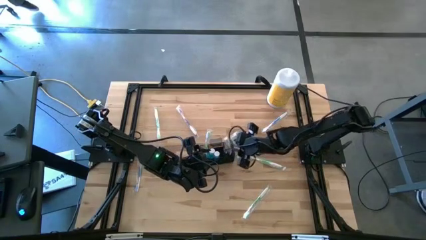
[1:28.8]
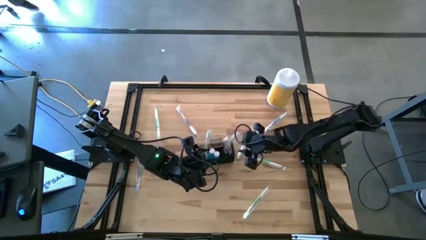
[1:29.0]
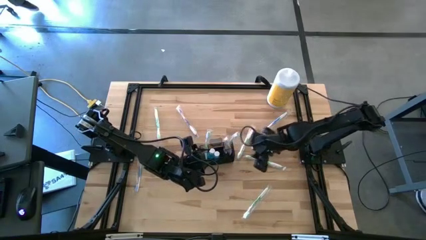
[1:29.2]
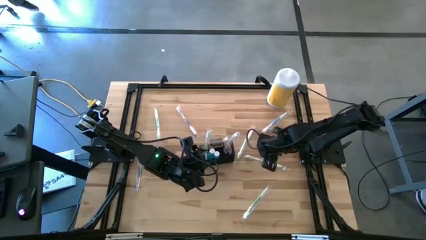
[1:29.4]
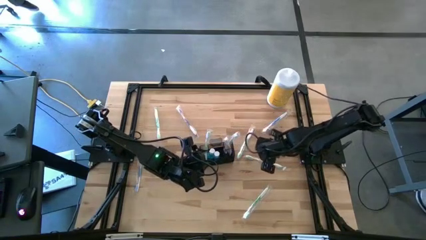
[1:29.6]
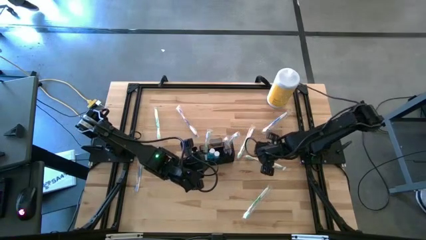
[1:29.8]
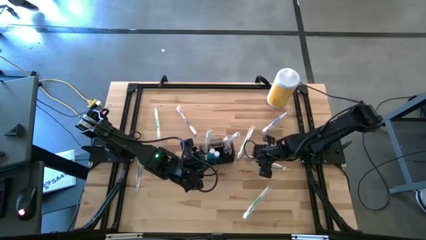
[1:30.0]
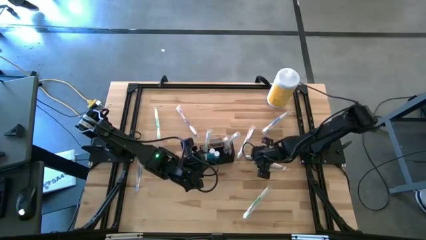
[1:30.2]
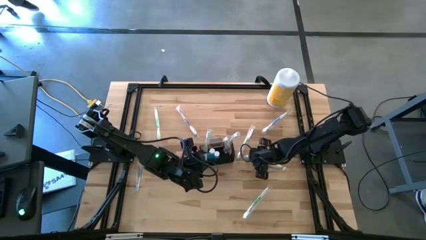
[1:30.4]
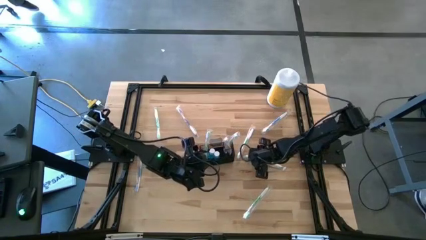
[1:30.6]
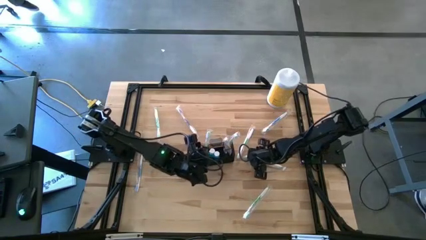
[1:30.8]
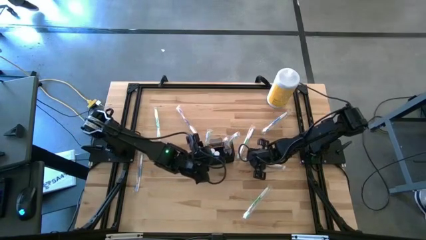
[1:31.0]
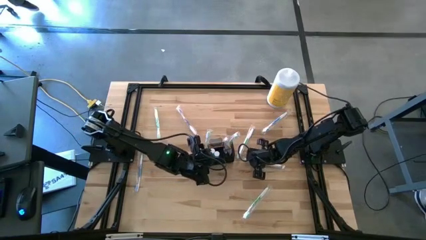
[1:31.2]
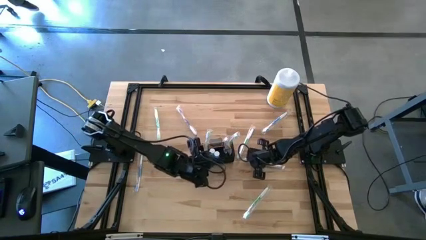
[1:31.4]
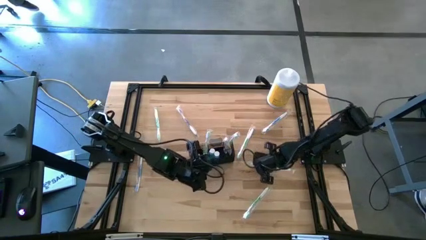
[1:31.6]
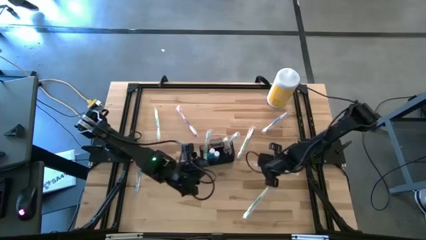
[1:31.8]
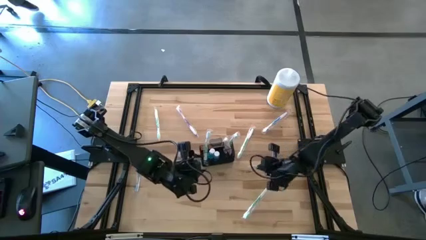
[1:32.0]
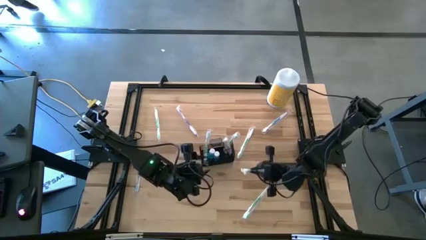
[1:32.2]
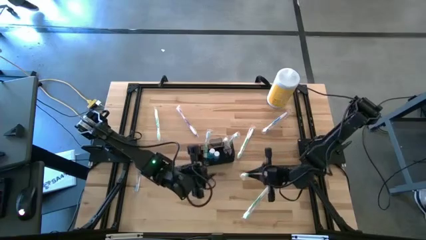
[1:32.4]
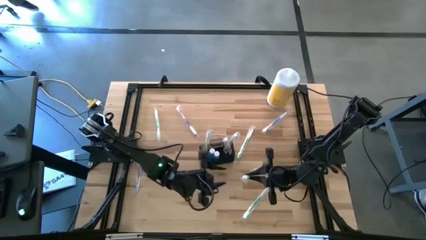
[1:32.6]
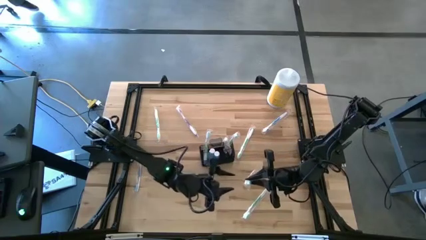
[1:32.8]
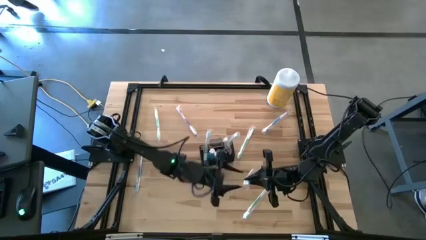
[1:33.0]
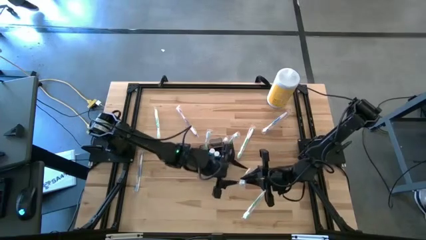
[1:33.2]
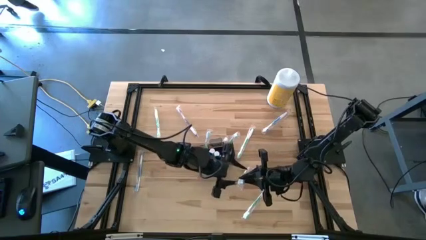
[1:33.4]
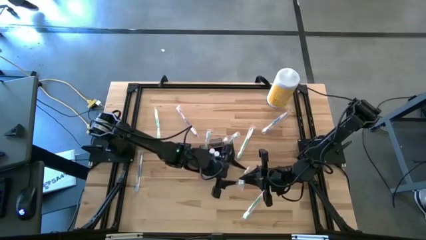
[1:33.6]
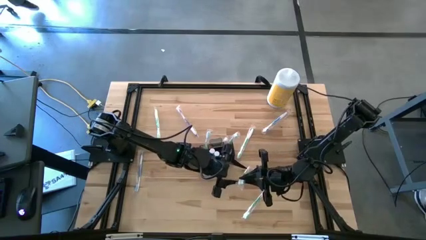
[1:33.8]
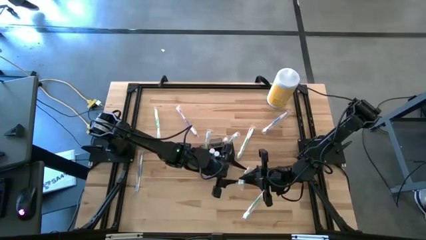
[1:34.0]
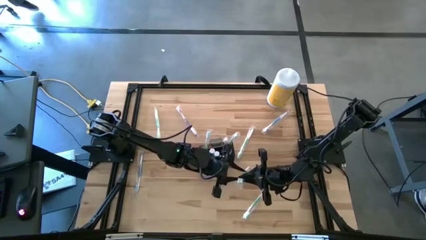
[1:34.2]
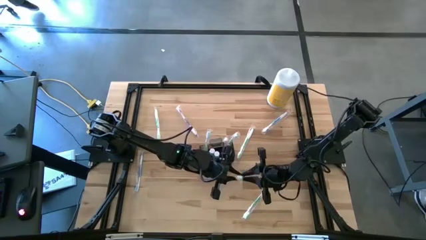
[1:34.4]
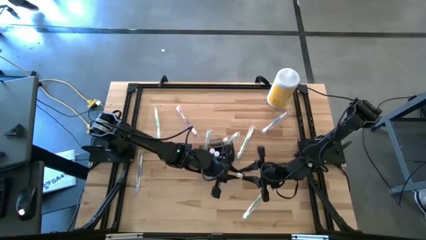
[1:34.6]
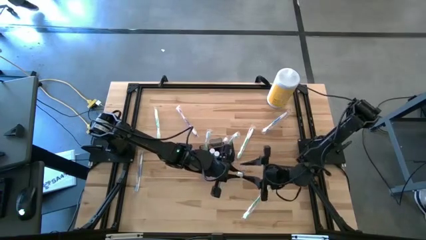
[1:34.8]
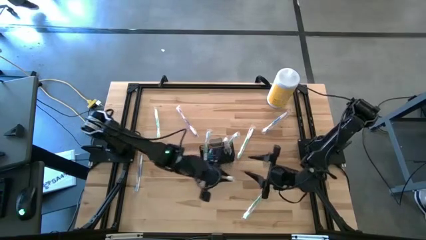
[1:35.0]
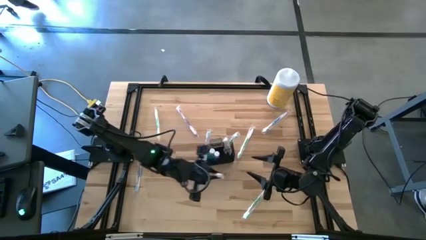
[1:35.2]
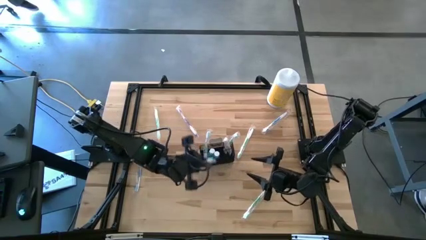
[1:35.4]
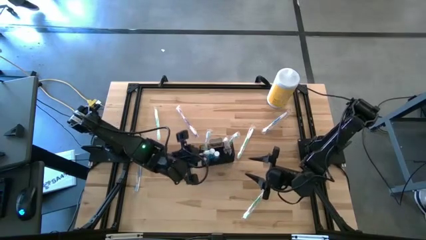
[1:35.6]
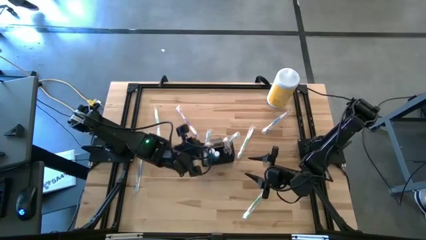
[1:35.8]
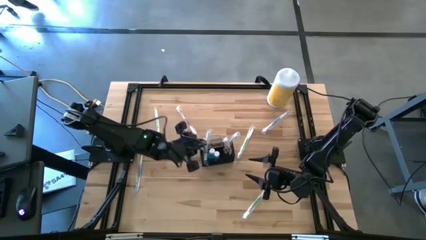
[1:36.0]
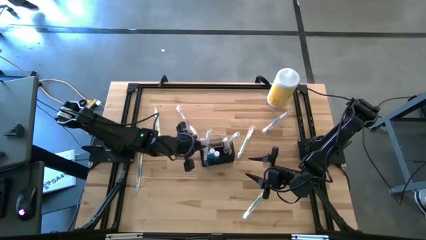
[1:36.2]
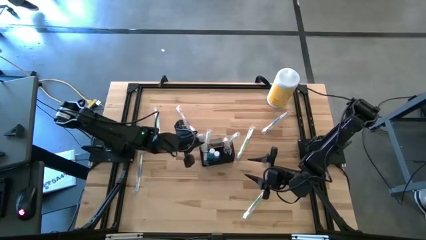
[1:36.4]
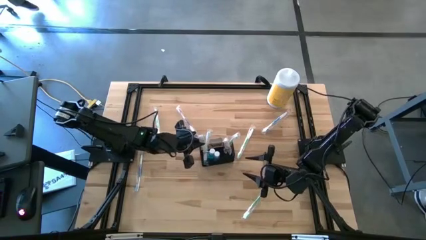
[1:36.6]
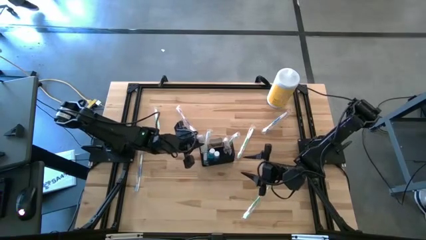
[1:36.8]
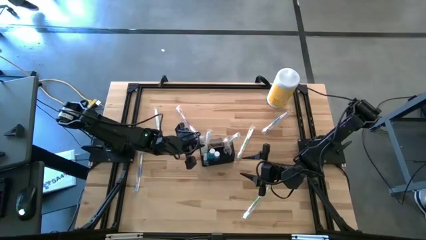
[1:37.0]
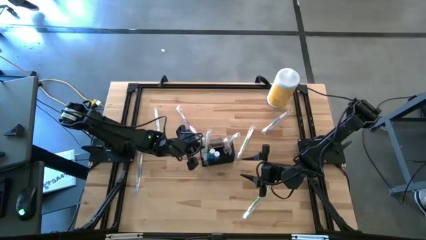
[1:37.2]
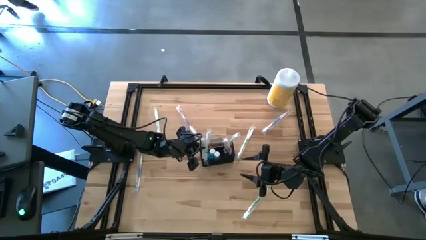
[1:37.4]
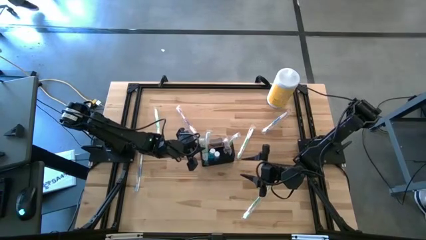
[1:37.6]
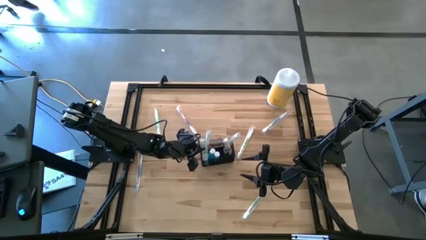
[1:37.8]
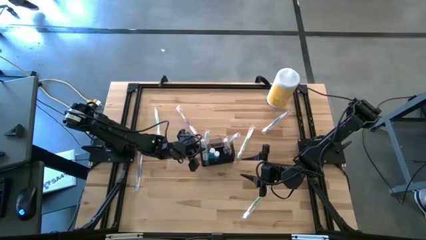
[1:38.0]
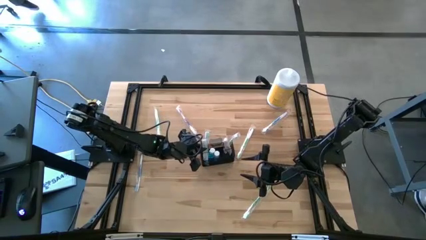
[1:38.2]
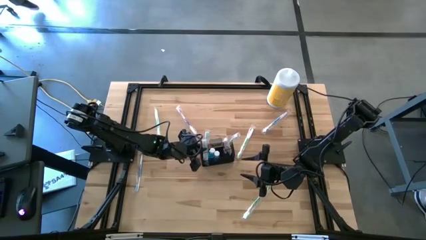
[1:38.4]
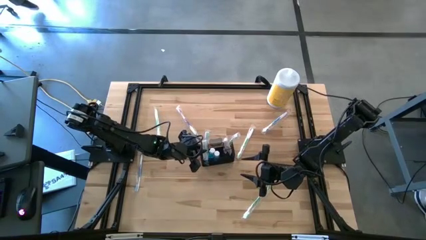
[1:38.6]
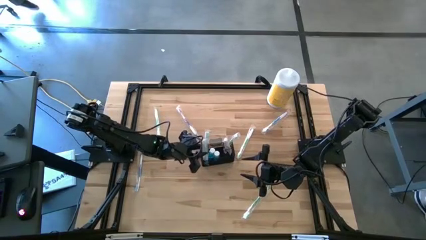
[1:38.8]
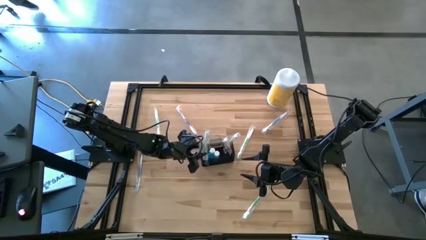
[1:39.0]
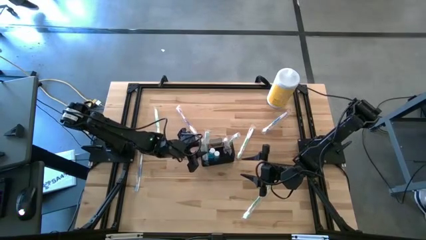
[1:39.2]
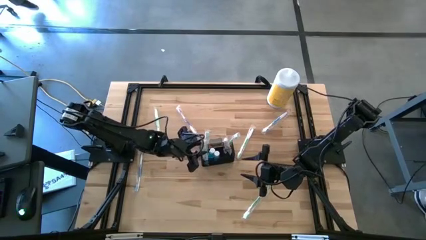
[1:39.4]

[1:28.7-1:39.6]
Task: Pick & Place toothbrushing station
Put the green toothbrush into the black mesh organizer

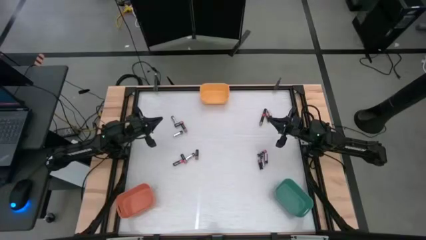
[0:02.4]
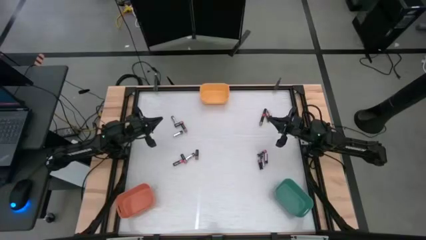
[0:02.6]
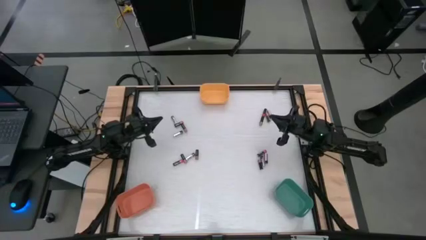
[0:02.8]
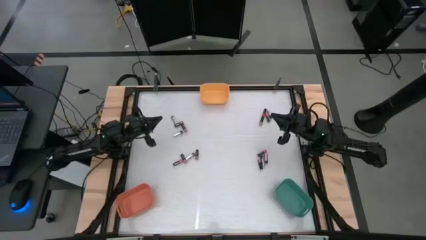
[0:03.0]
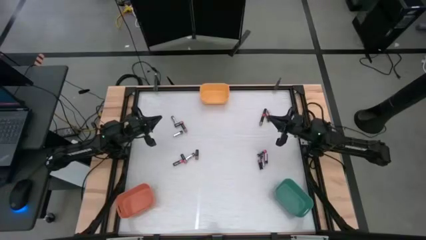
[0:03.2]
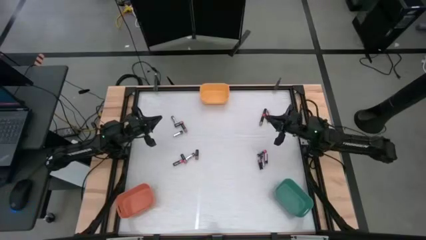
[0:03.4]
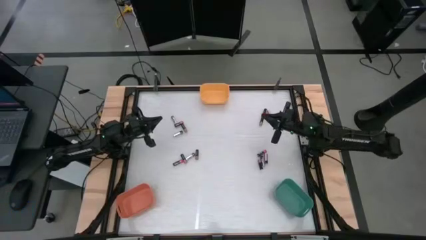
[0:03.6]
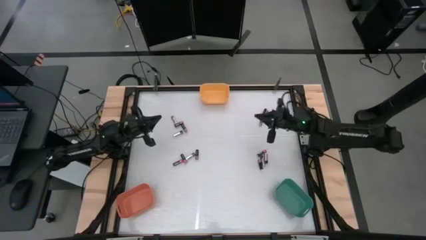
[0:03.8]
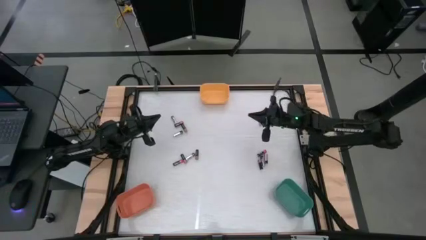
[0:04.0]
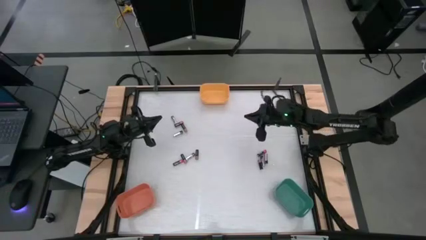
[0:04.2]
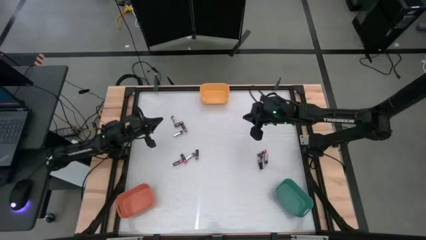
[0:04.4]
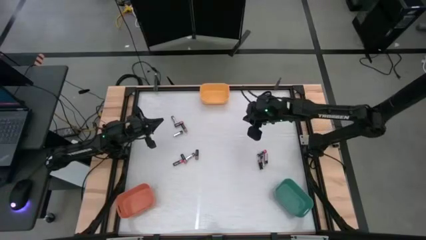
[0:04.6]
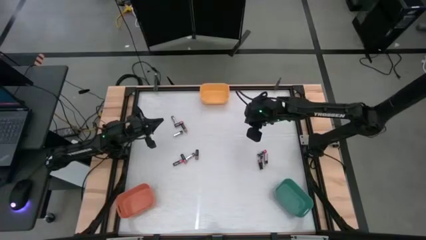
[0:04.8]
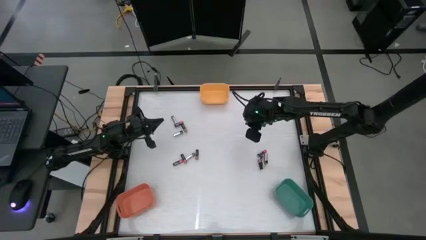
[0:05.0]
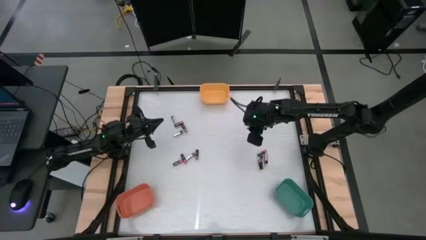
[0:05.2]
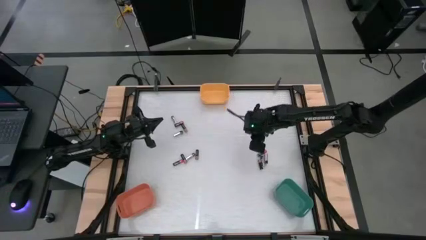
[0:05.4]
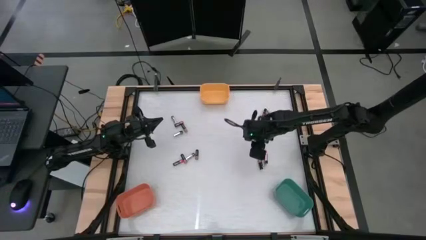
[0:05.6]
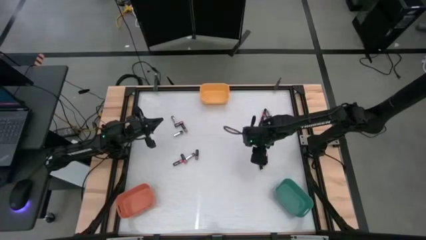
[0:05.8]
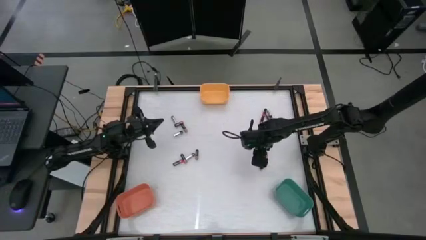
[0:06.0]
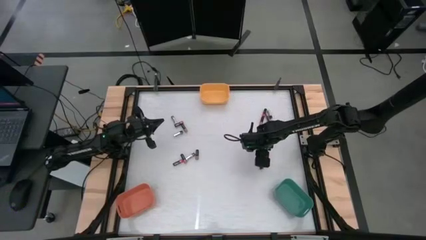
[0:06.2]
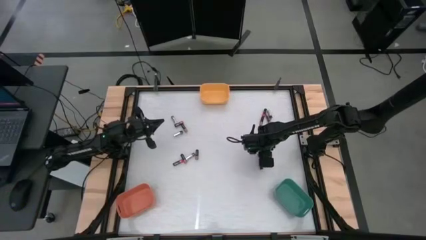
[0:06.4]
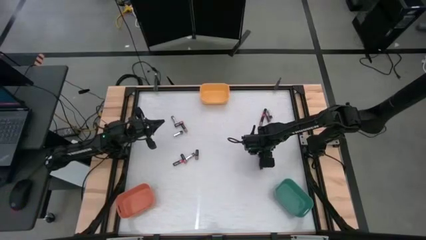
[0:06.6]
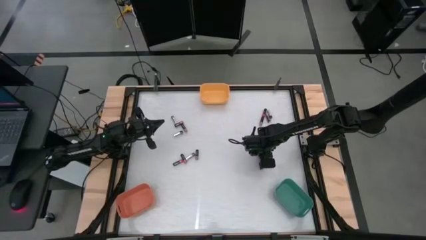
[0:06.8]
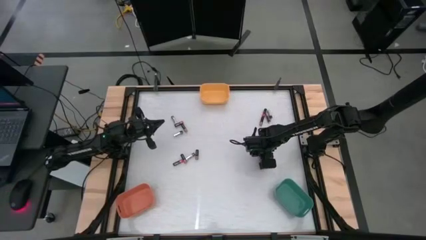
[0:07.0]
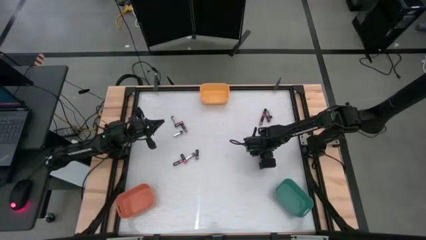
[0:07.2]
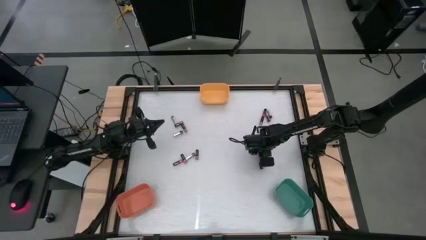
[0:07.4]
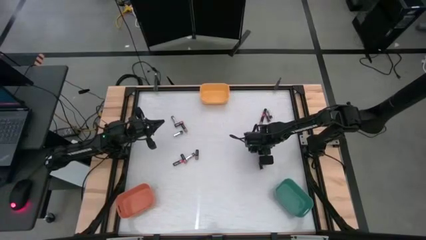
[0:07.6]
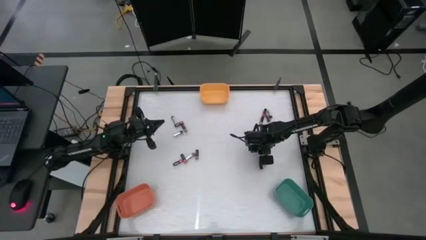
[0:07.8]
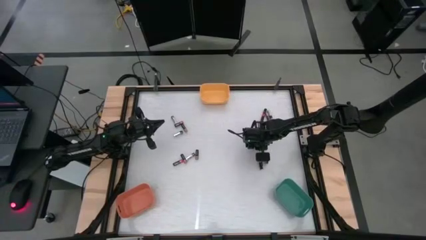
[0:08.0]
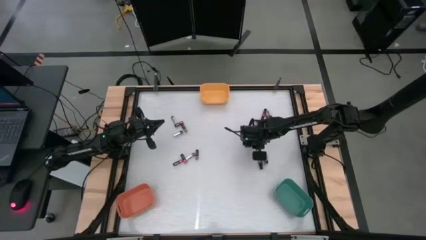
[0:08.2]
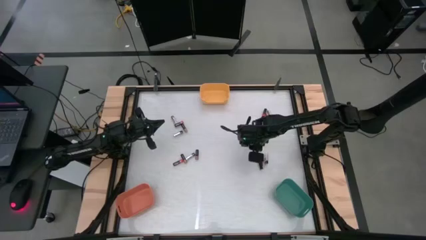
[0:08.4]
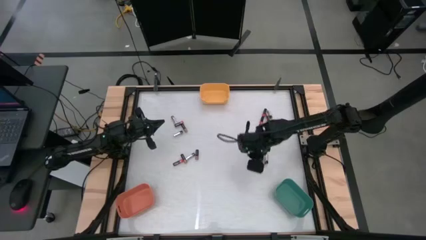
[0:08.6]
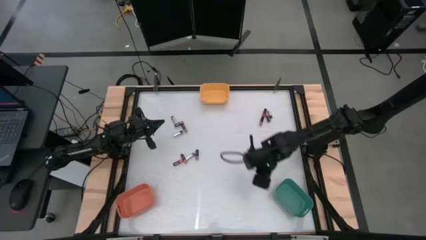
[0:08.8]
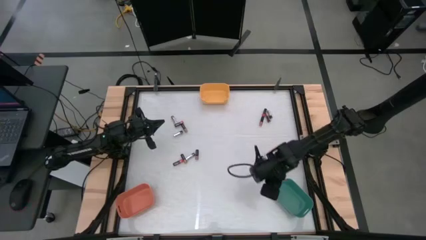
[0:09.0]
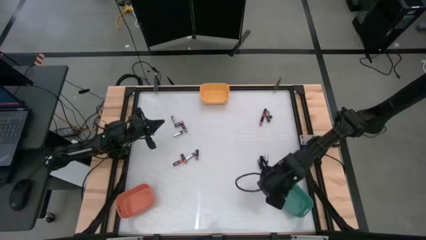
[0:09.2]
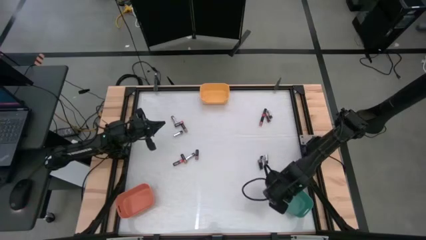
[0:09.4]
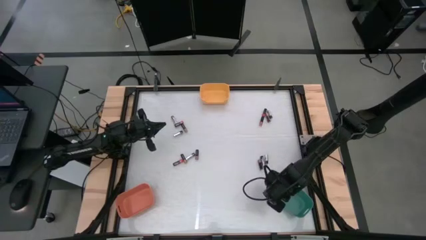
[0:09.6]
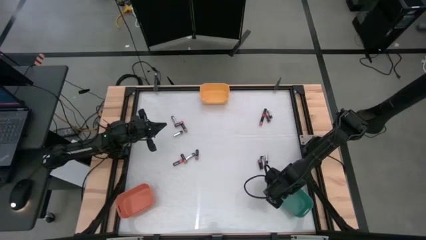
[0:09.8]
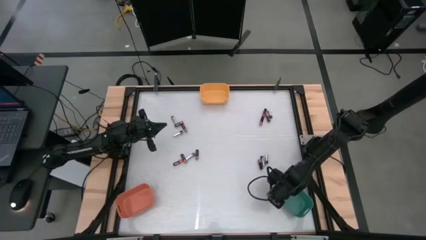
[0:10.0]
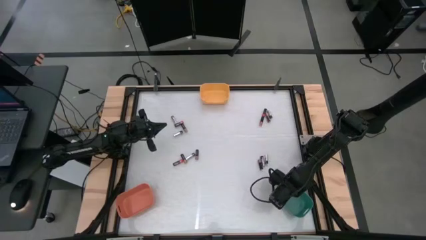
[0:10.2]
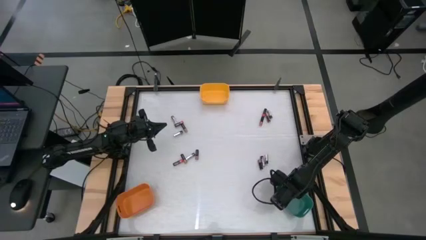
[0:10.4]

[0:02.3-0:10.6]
Task: Sort batteries
Put the black-red battery into the green bin
